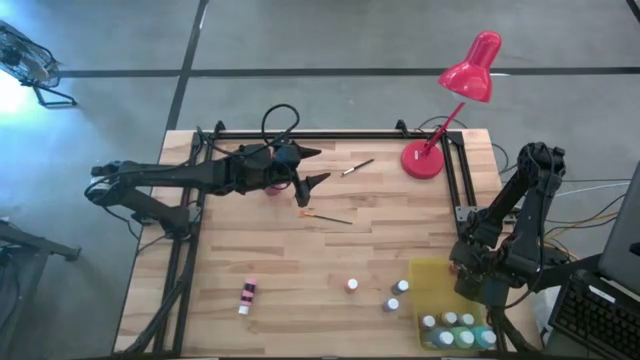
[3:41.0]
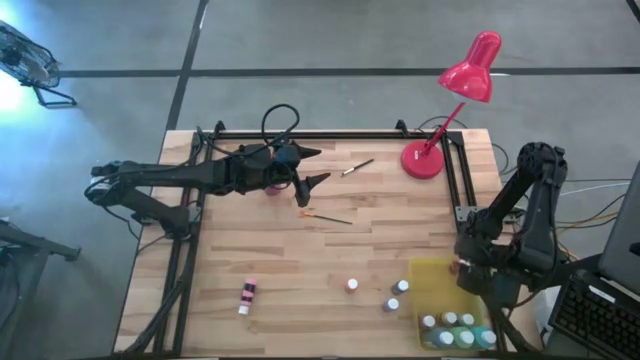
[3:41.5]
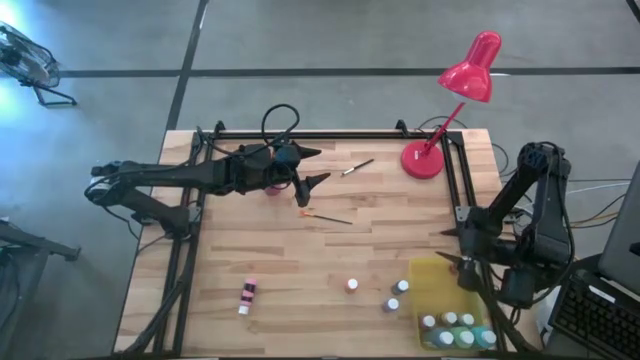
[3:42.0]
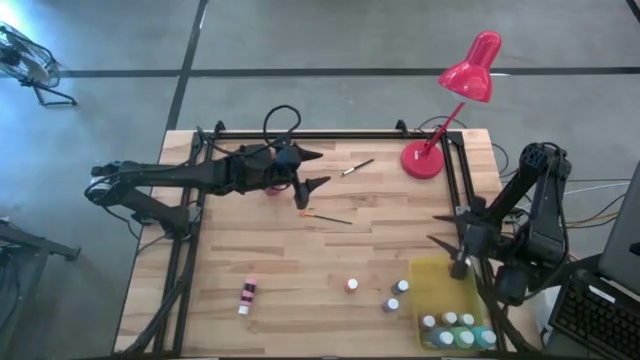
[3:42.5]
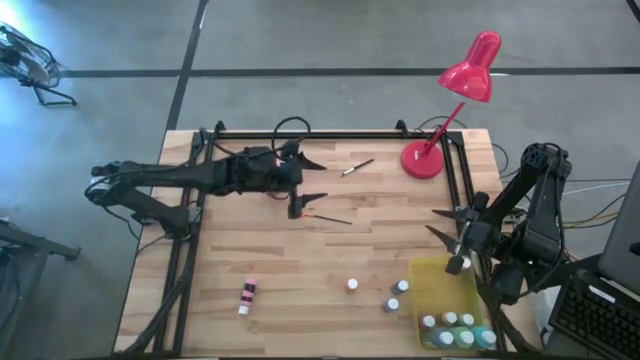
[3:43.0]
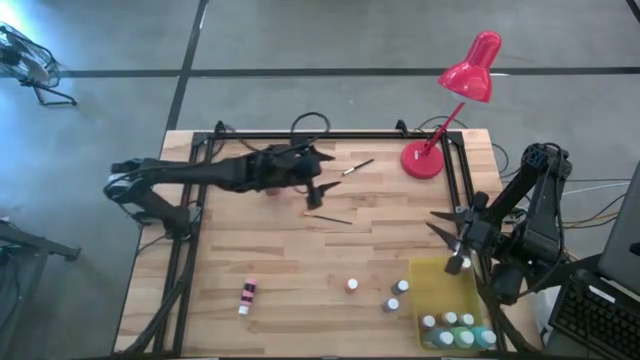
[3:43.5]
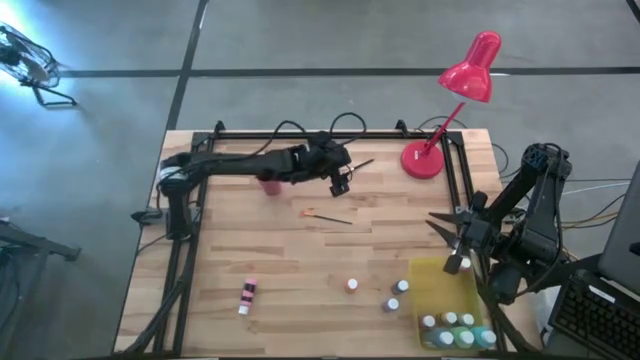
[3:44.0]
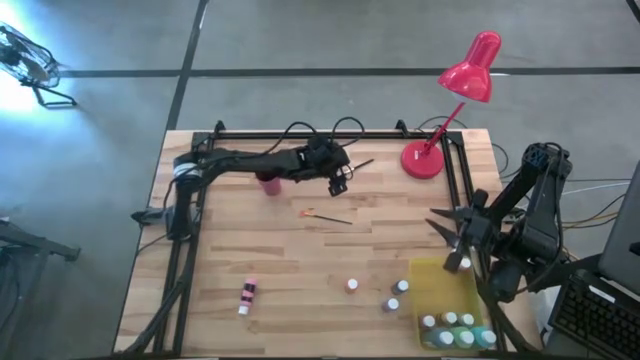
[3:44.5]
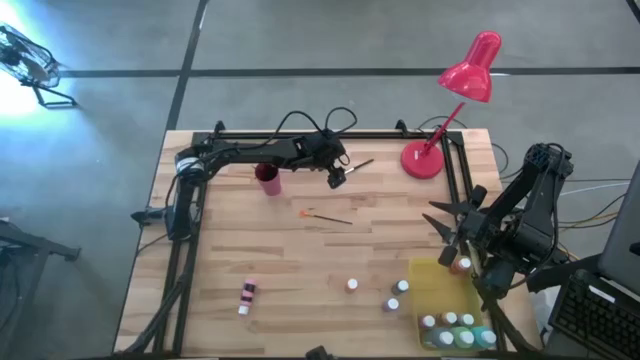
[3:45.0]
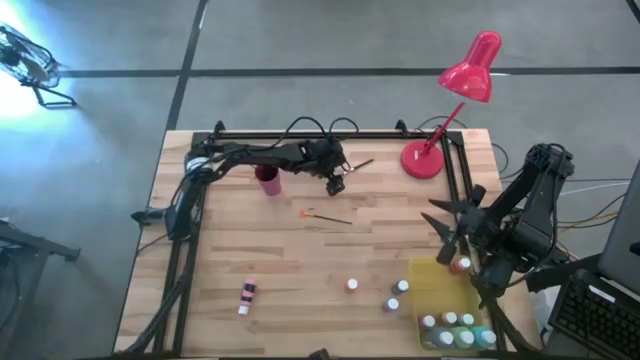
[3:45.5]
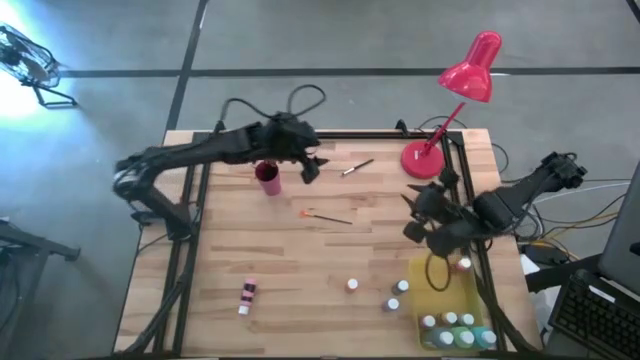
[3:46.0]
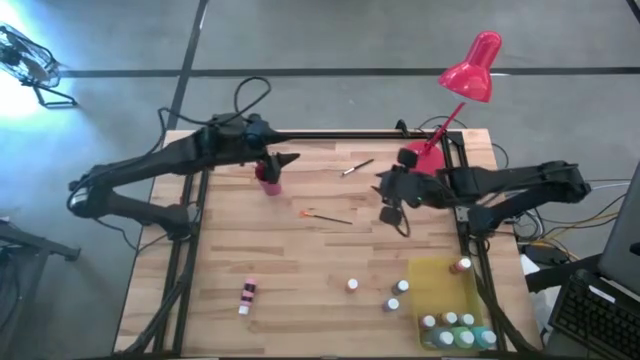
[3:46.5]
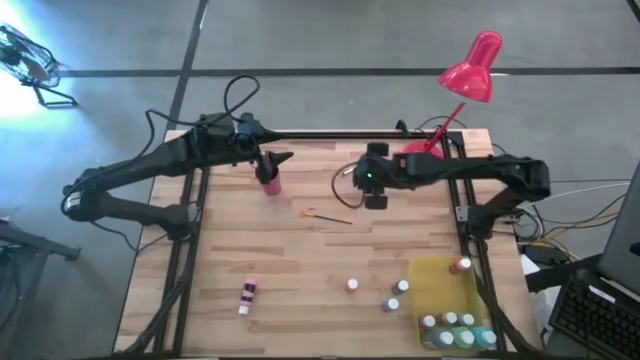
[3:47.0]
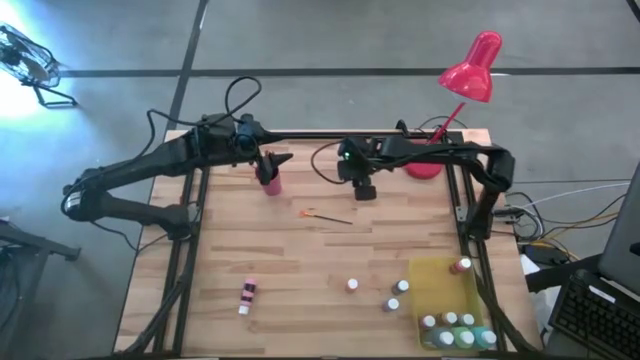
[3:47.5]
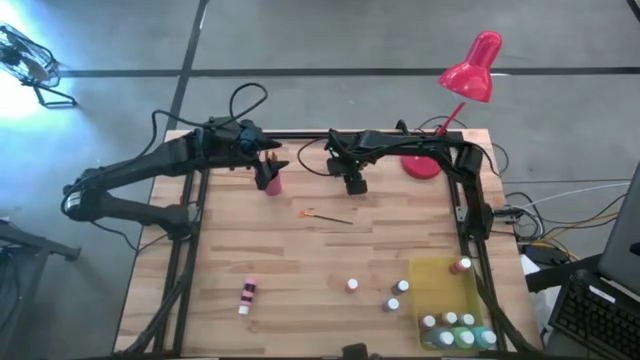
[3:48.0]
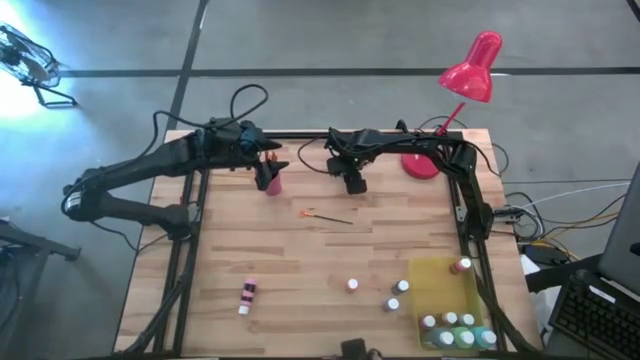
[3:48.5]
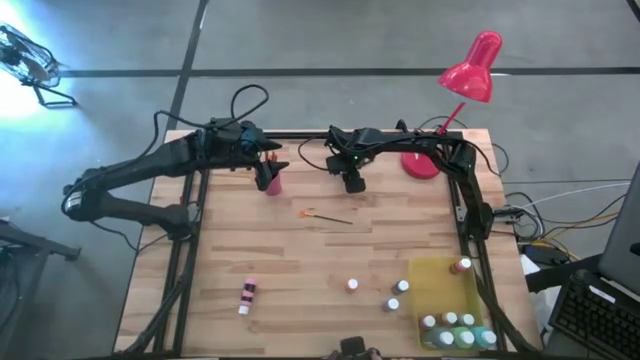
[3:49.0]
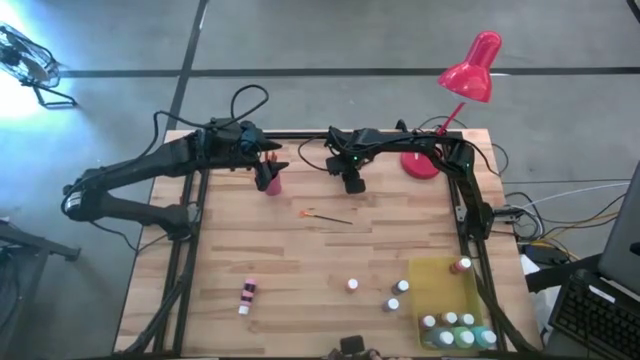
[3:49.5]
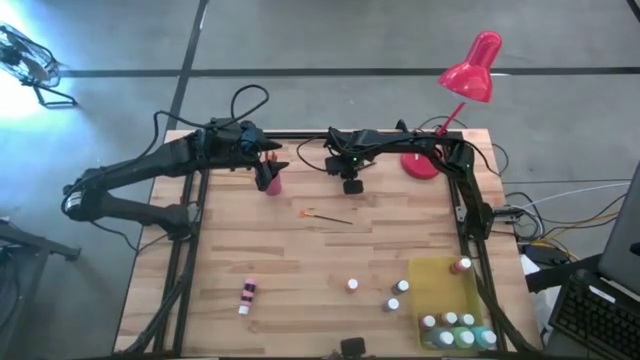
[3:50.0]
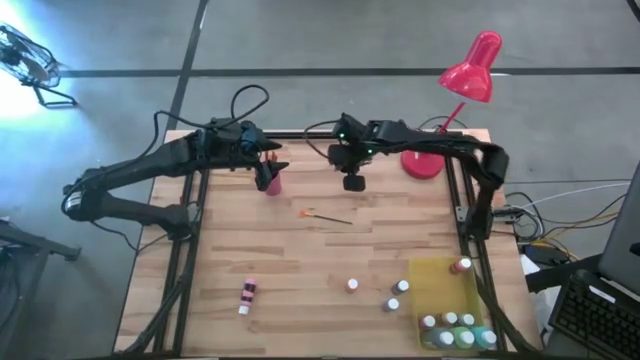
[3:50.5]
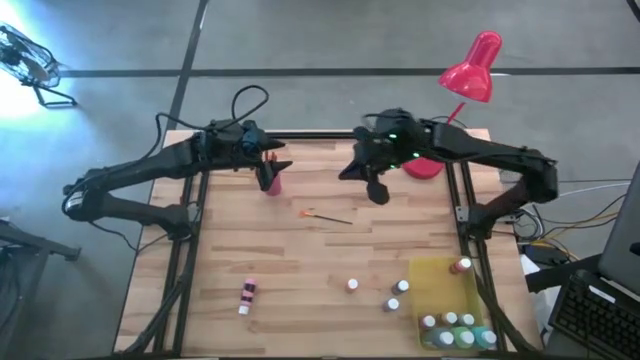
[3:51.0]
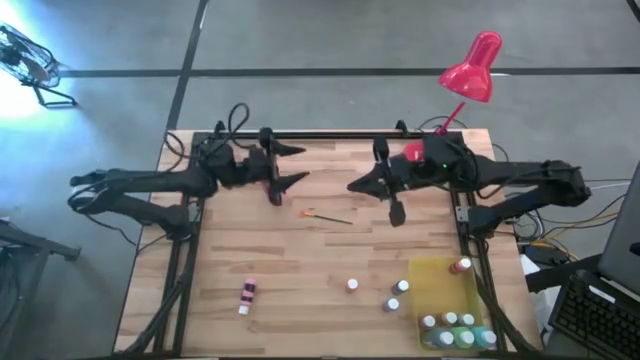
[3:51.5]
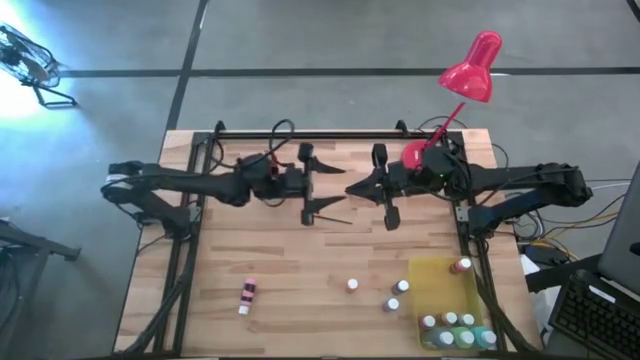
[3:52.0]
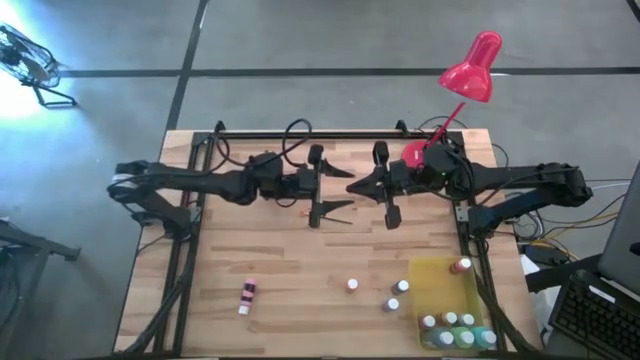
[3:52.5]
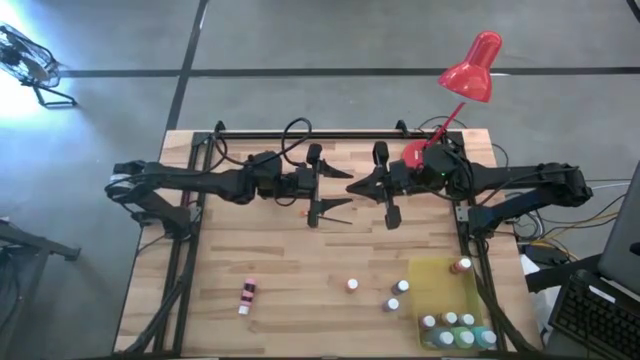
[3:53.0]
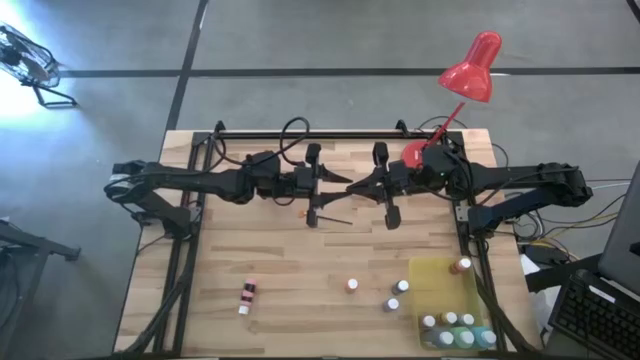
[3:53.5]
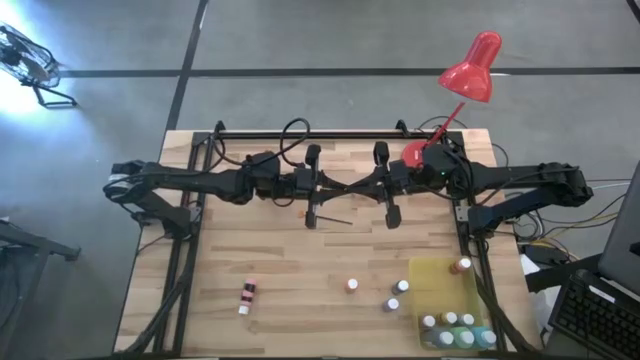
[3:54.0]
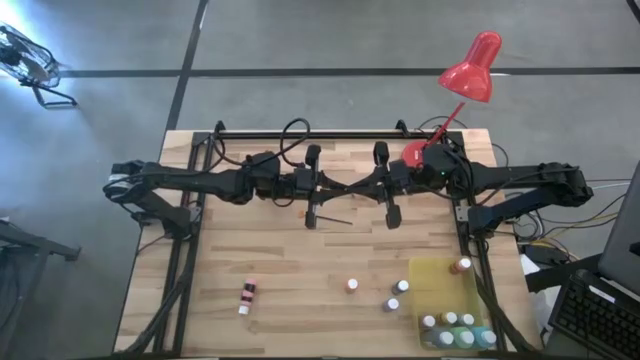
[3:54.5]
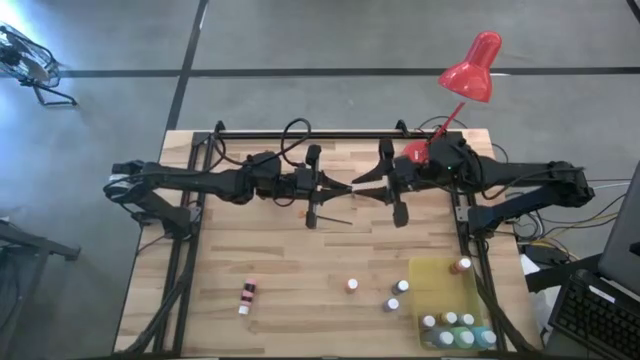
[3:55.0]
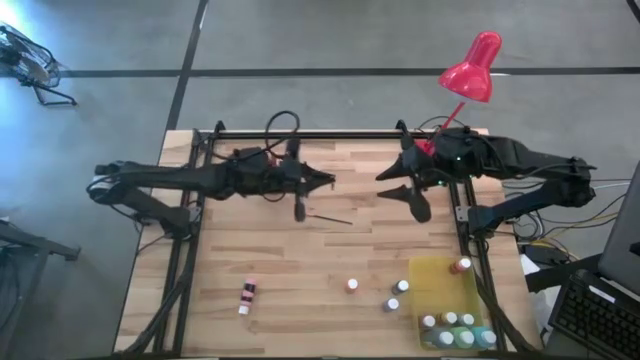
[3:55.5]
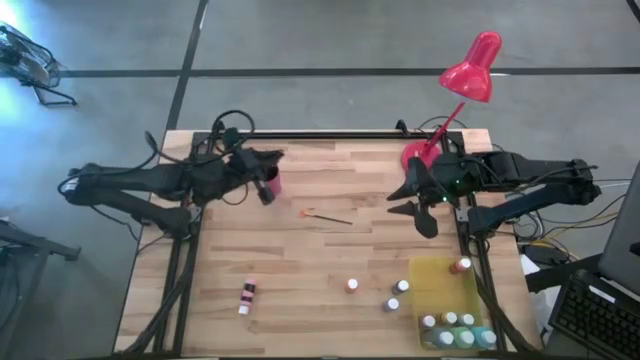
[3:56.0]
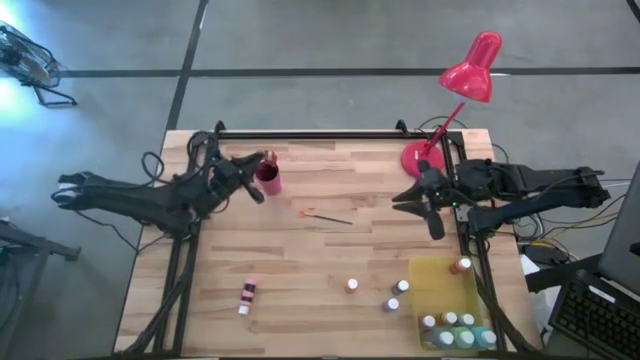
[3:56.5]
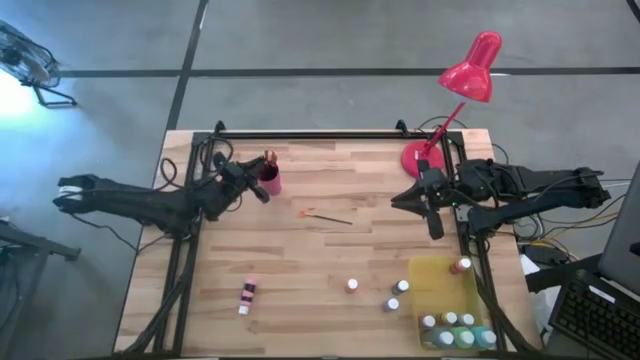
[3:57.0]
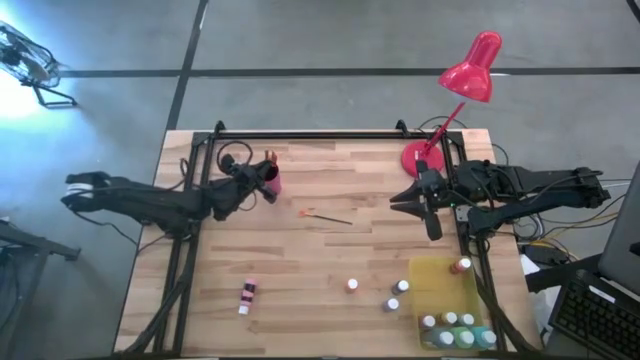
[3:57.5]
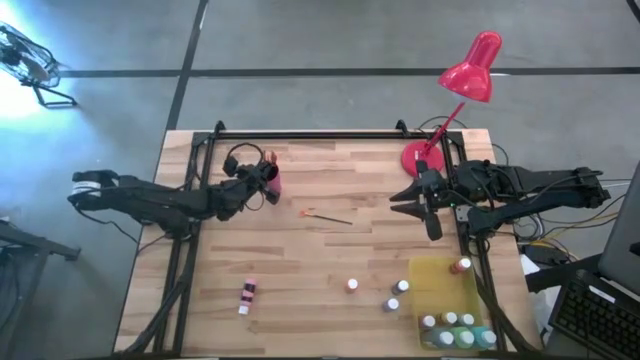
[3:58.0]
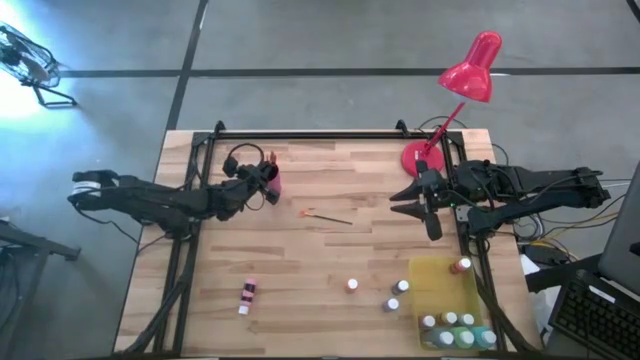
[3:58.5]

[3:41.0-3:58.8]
Task: Pick & Place Paint Supplies
Put the black paint brush into the pink cup

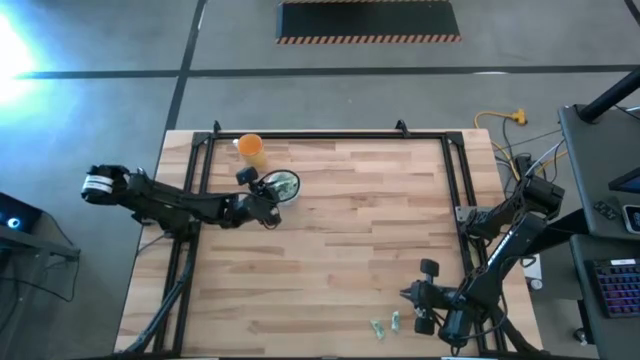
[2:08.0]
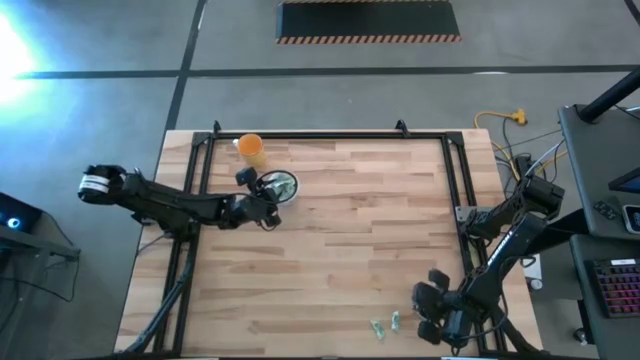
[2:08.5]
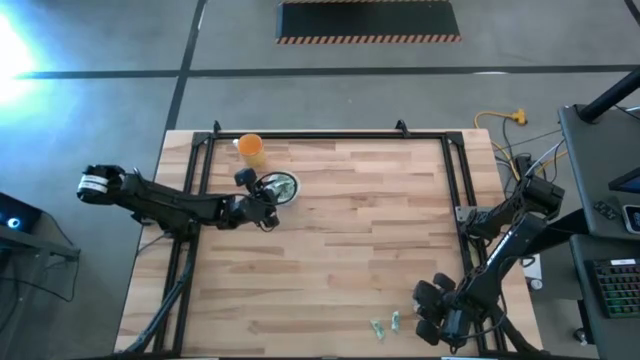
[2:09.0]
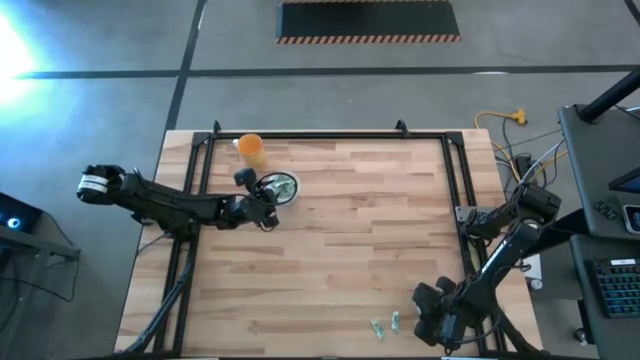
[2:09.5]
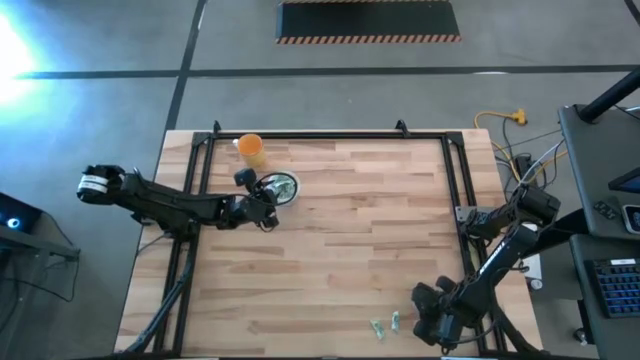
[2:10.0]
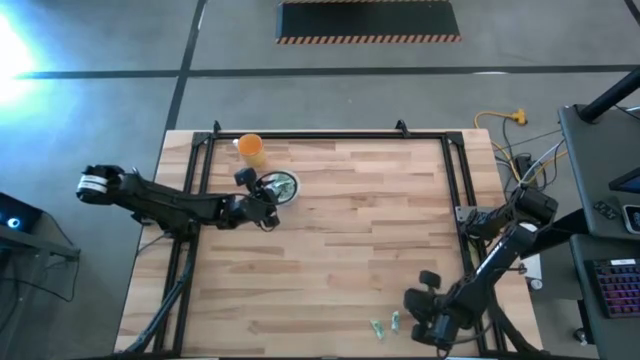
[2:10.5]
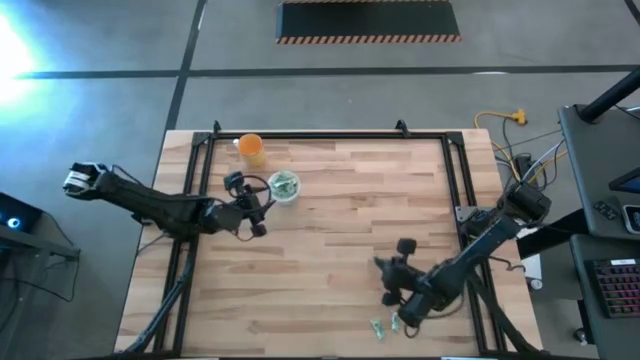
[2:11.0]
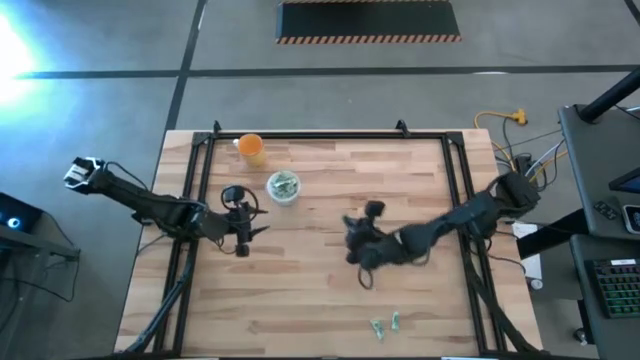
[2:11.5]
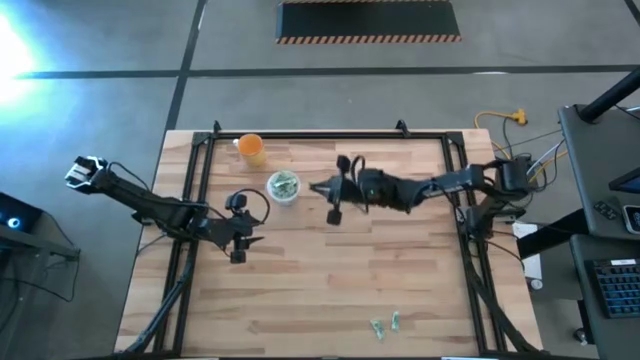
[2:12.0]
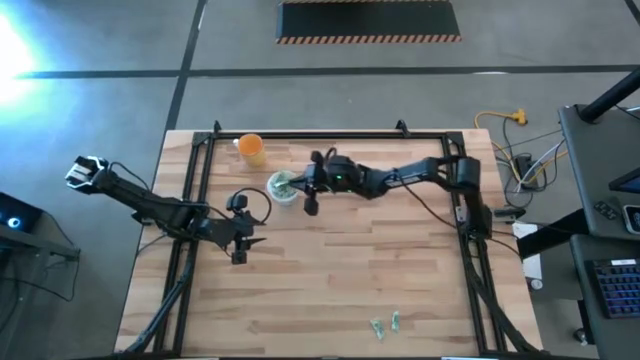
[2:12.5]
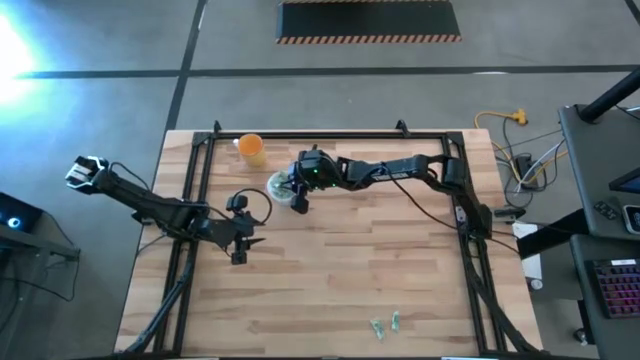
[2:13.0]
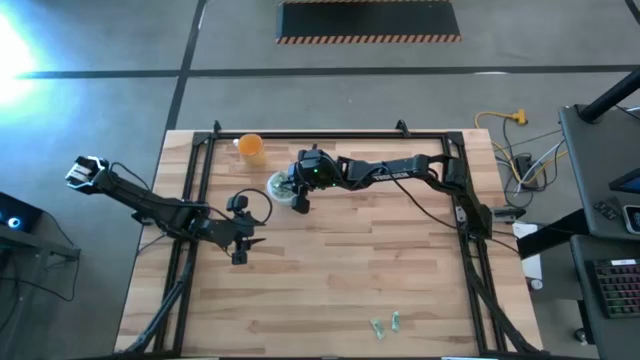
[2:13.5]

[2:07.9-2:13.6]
Task: Pick and place Stevia / Truvia into bins
Put the stevia packet into the transparent container
